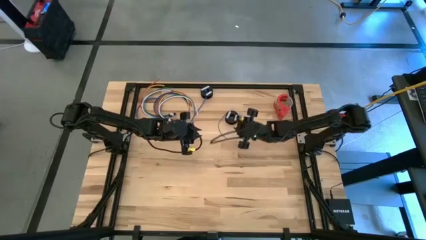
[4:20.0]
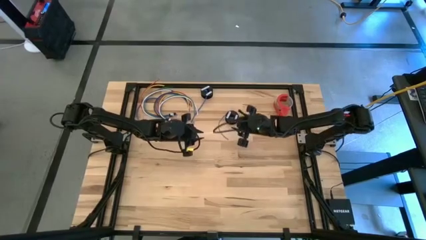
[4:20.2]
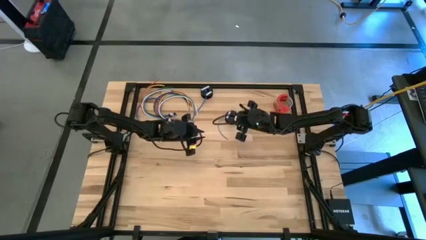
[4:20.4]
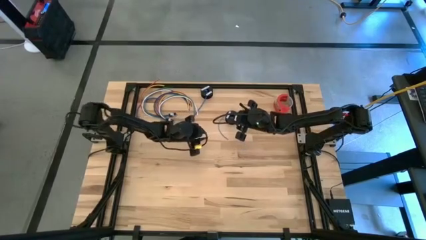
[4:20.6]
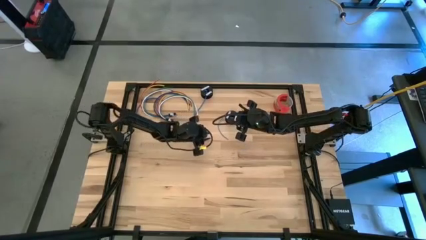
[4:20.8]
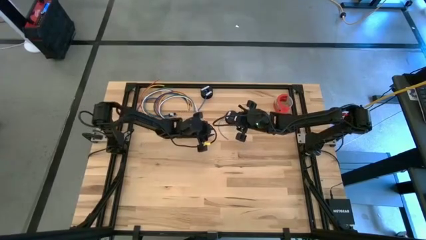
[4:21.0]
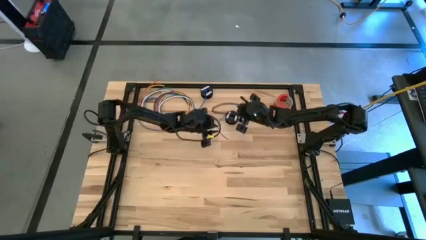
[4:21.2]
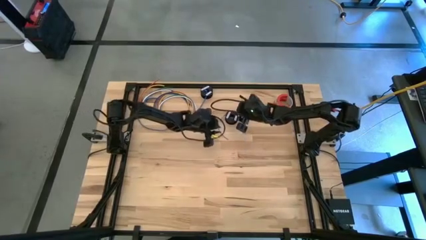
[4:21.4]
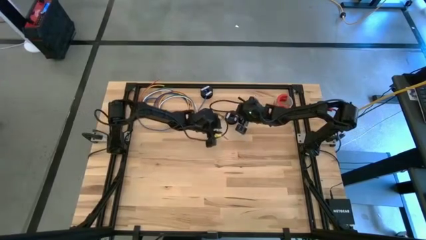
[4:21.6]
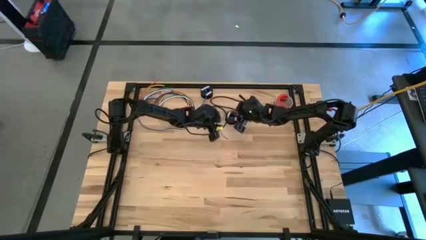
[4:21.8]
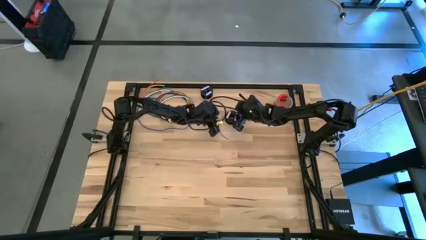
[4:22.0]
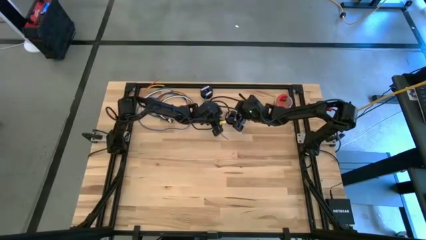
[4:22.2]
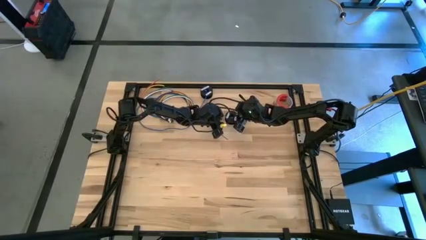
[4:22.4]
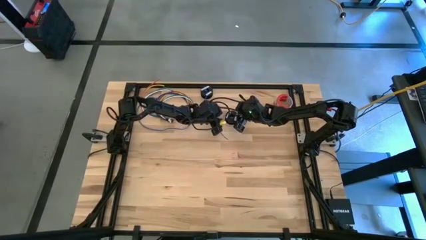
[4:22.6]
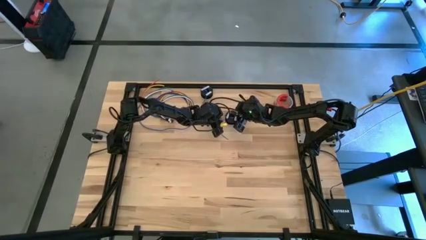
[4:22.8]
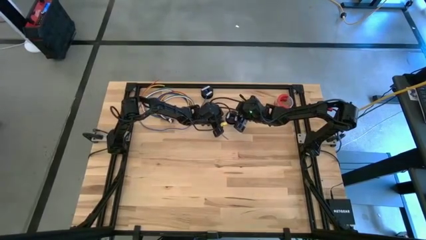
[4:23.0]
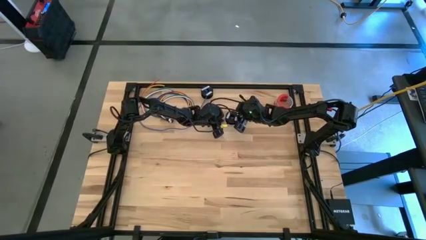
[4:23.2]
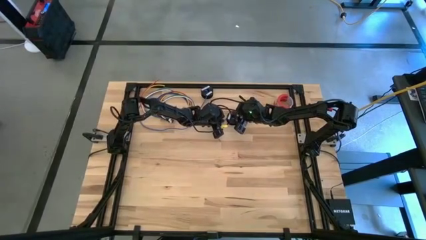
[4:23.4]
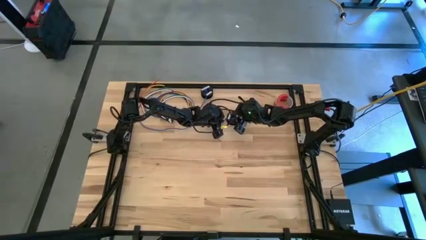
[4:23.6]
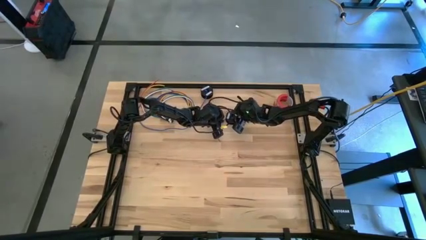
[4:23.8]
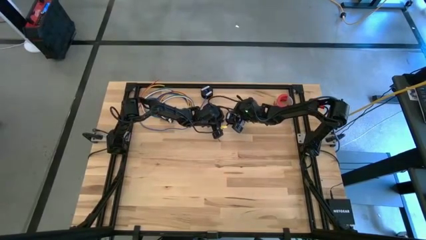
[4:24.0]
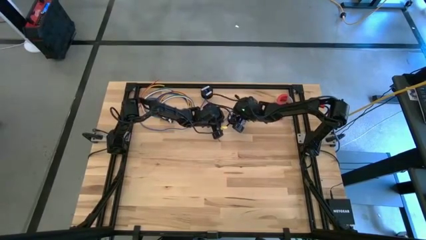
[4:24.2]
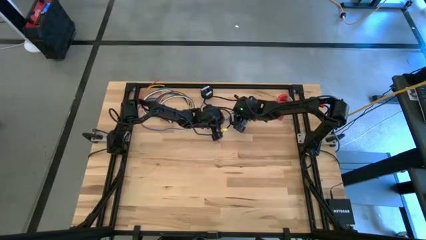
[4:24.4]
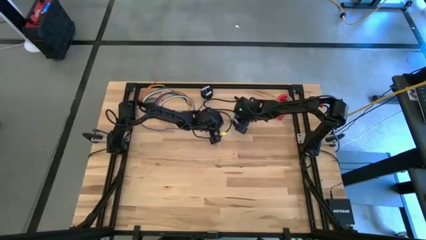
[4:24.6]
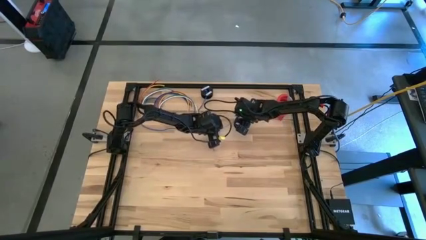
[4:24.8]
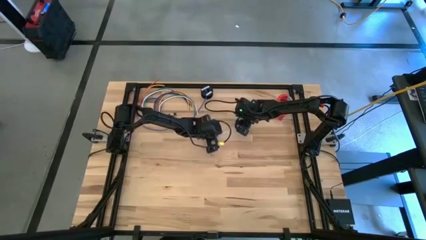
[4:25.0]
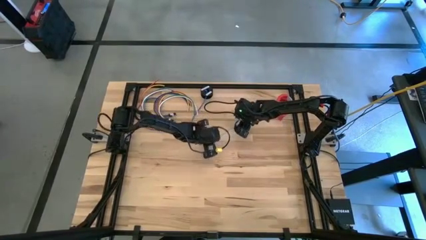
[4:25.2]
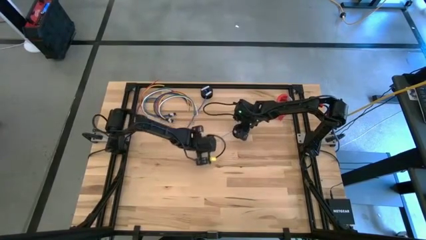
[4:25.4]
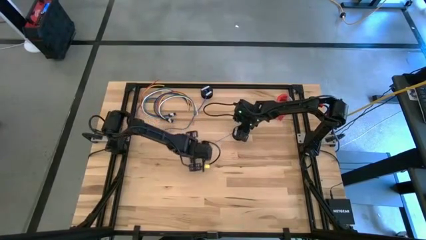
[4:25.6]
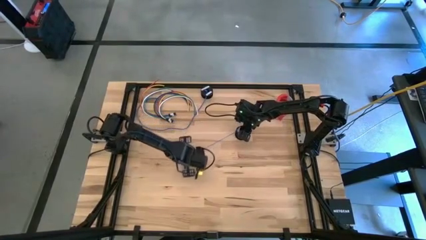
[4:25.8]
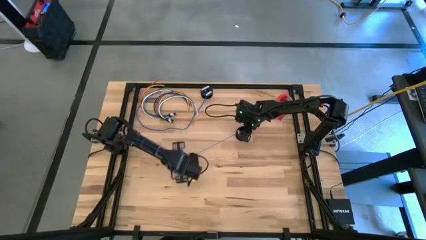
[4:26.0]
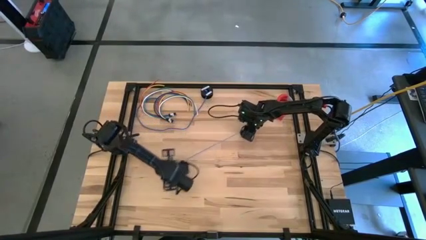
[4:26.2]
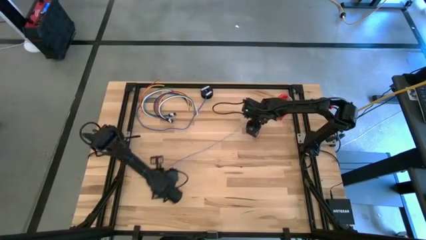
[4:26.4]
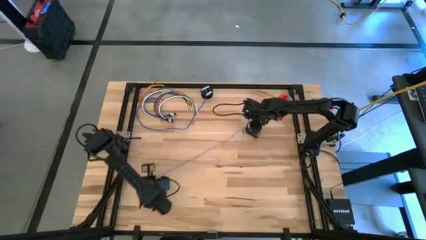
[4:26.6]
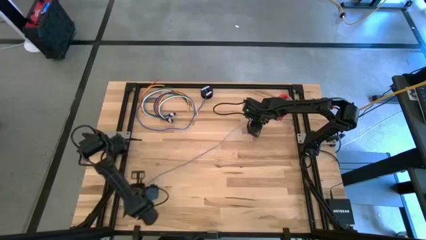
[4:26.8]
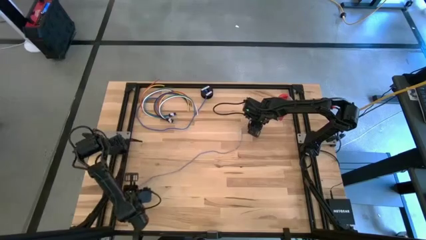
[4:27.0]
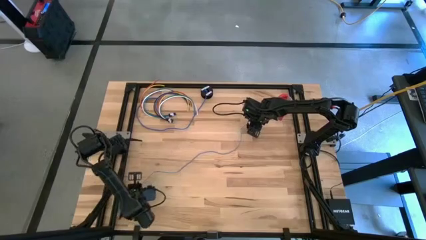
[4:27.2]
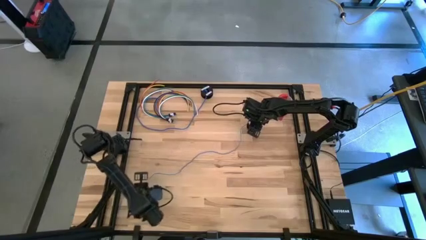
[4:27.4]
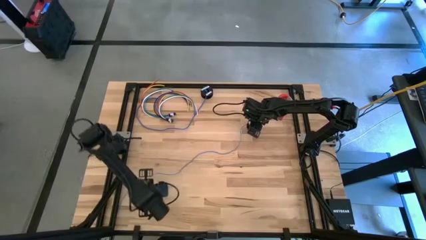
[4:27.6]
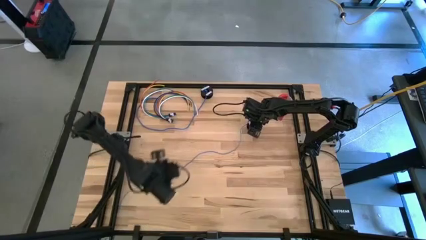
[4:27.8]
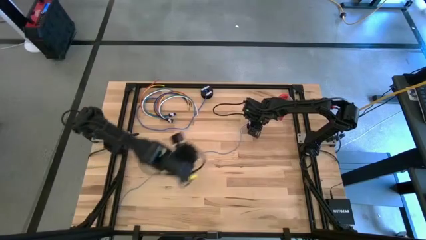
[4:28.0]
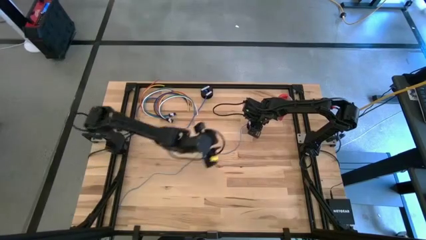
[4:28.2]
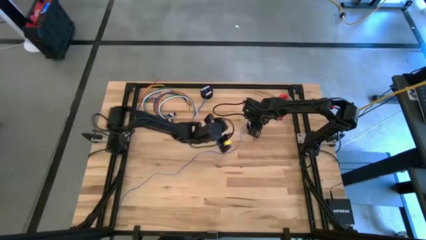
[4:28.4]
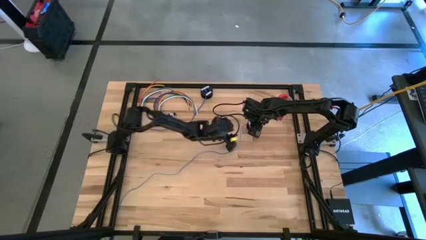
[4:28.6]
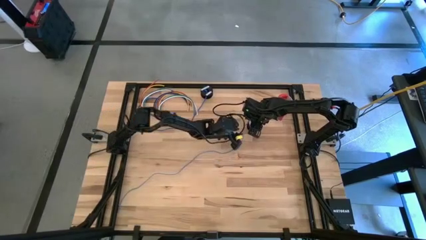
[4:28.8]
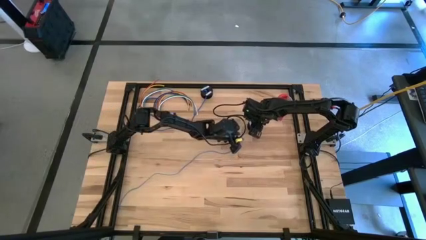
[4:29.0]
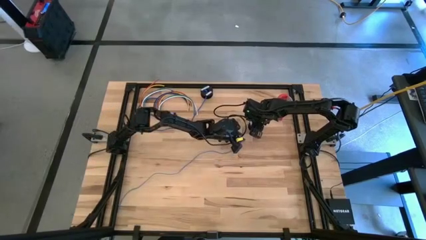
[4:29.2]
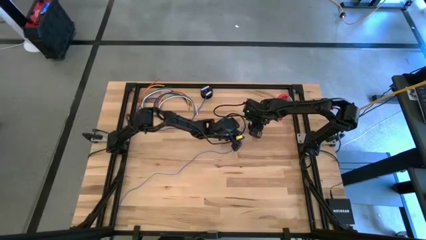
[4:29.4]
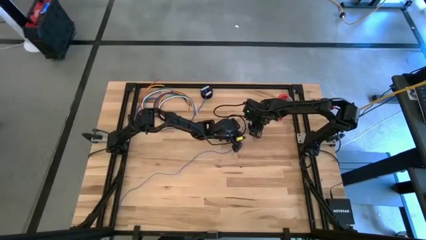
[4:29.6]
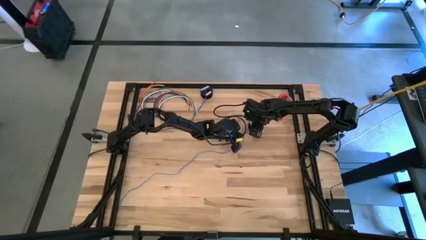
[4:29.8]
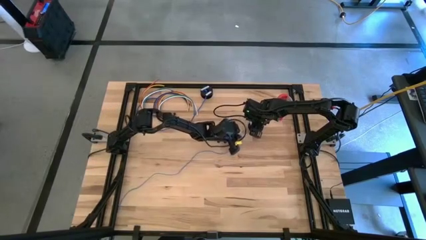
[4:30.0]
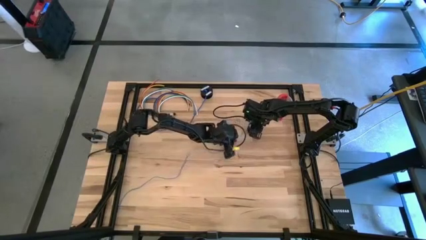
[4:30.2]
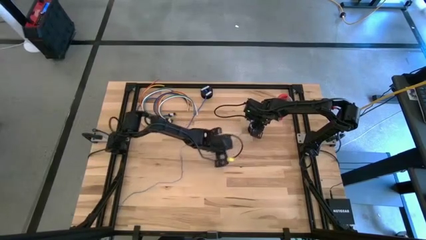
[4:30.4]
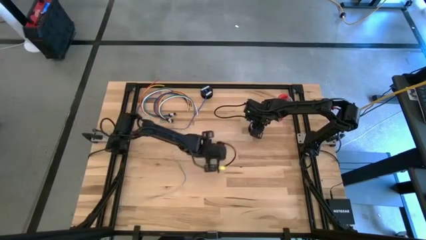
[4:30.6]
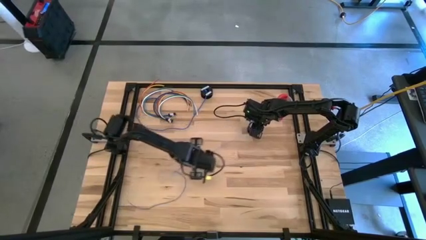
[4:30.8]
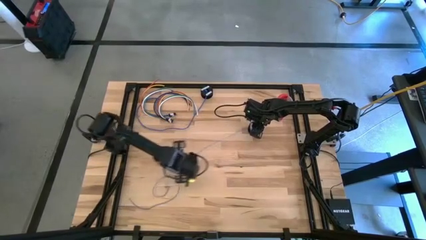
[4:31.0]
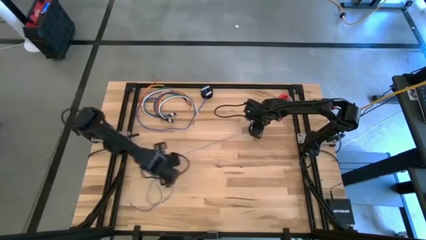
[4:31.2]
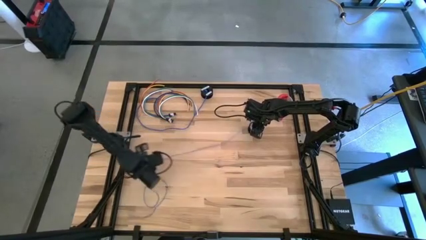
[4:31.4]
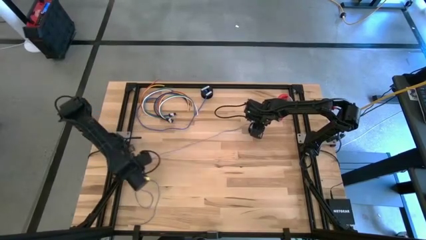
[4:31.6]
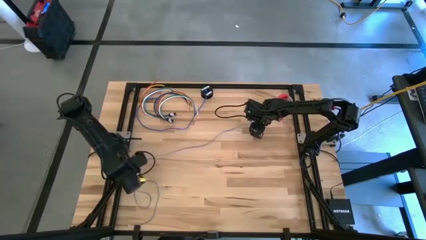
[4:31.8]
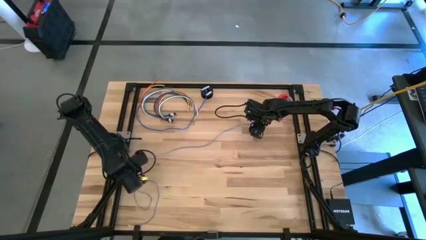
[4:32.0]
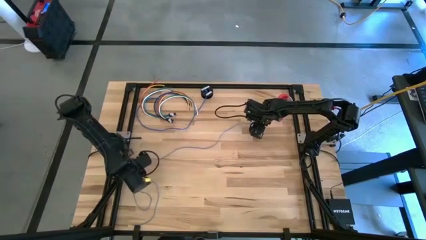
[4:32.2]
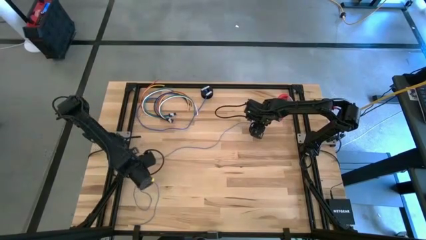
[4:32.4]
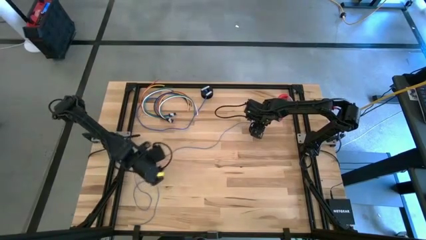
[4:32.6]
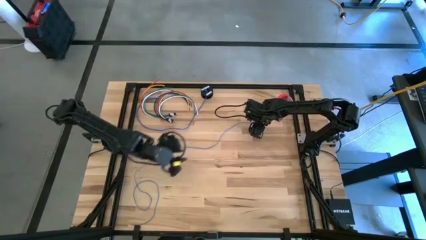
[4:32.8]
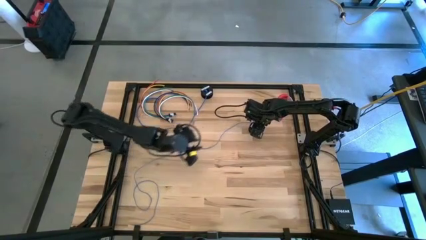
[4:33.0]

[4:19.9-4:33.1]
Task: Coil cords
Uncoil the blue wire from the black spool
